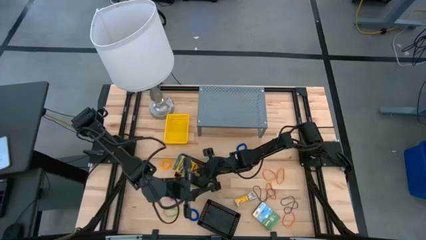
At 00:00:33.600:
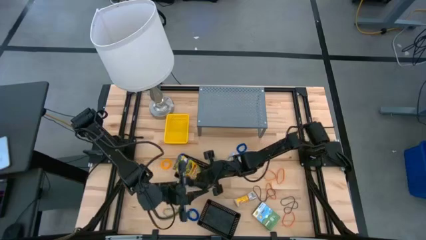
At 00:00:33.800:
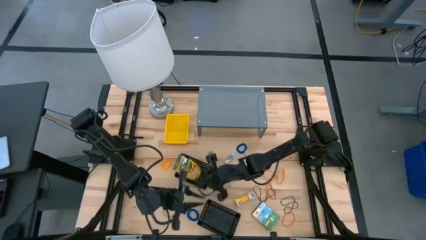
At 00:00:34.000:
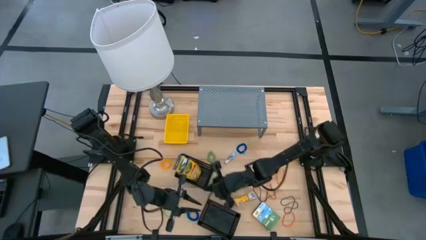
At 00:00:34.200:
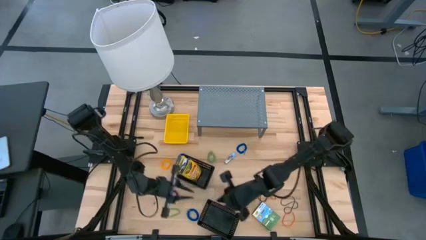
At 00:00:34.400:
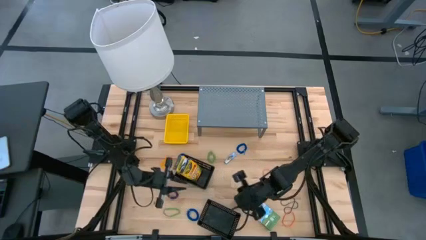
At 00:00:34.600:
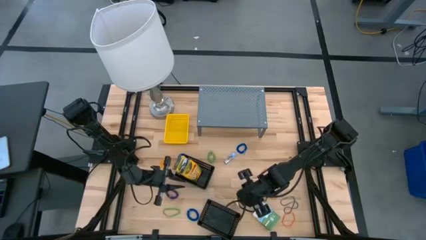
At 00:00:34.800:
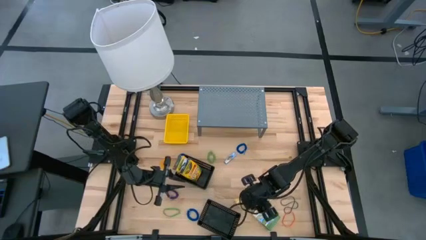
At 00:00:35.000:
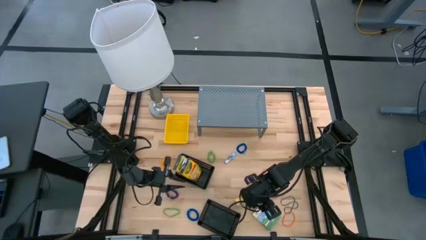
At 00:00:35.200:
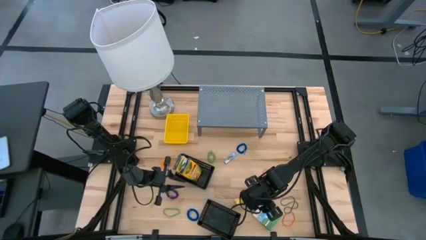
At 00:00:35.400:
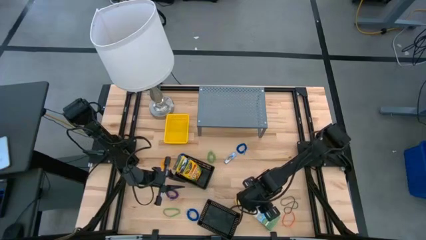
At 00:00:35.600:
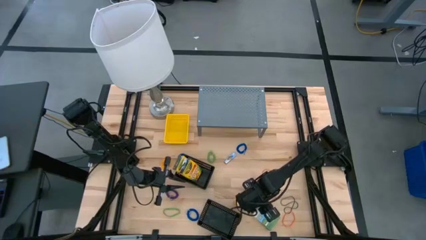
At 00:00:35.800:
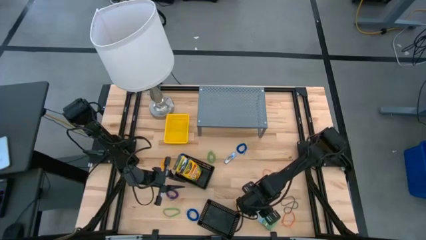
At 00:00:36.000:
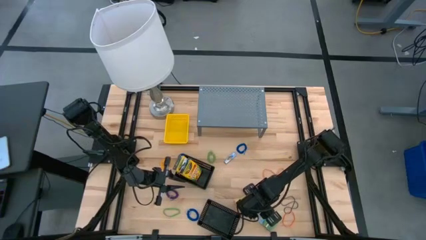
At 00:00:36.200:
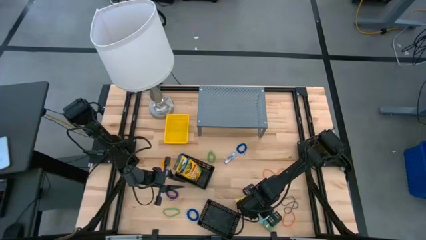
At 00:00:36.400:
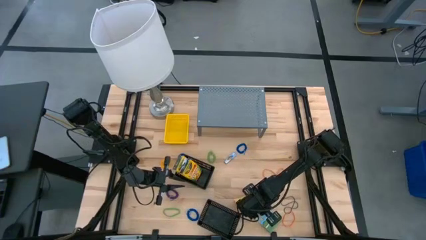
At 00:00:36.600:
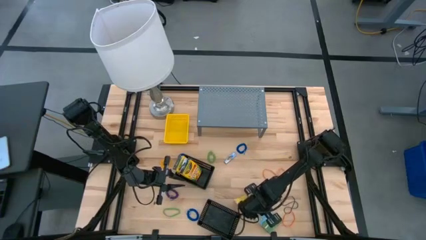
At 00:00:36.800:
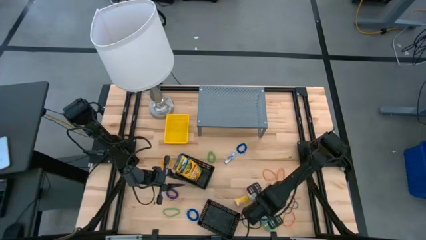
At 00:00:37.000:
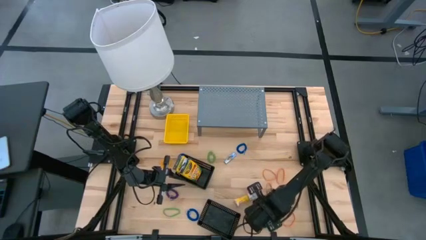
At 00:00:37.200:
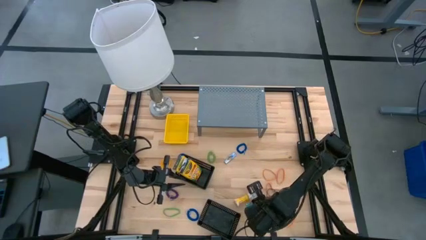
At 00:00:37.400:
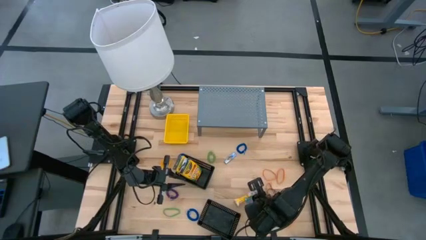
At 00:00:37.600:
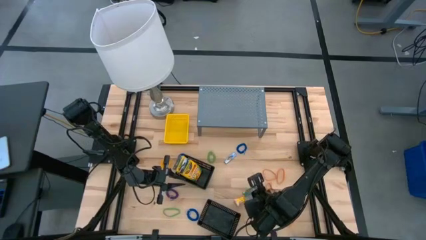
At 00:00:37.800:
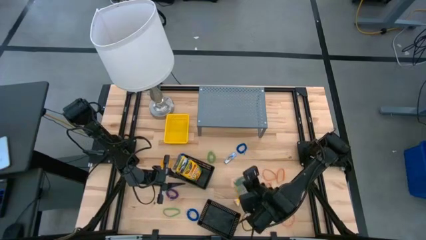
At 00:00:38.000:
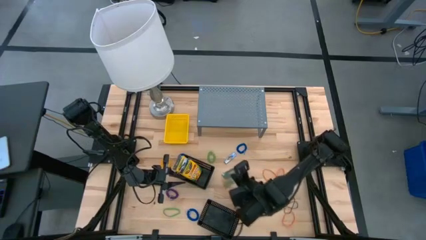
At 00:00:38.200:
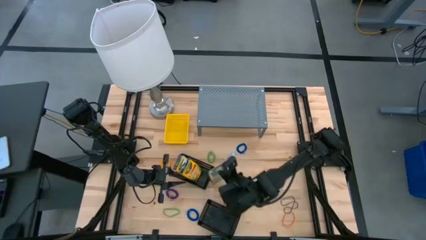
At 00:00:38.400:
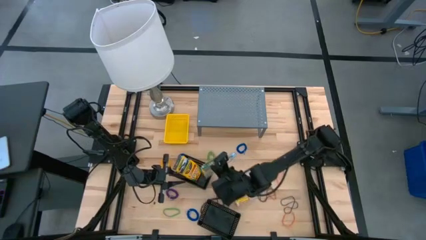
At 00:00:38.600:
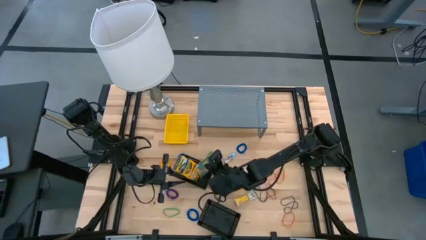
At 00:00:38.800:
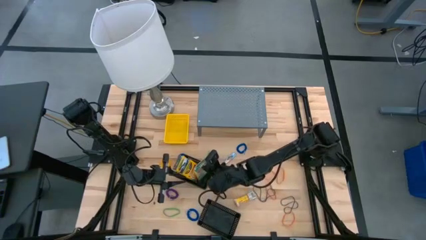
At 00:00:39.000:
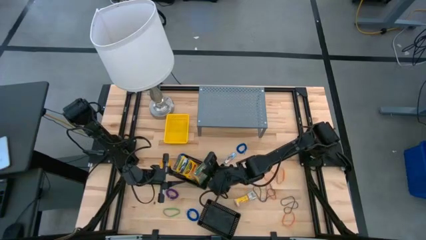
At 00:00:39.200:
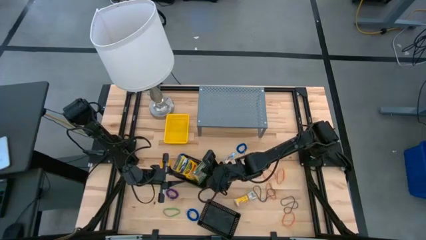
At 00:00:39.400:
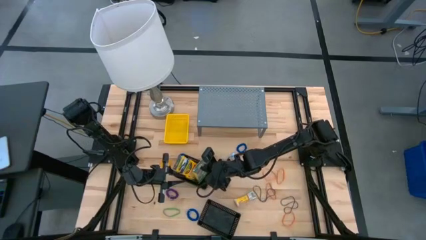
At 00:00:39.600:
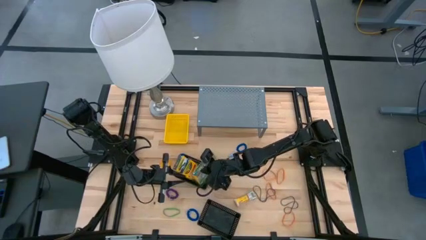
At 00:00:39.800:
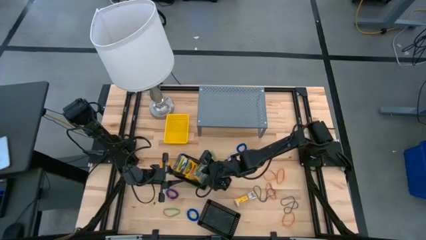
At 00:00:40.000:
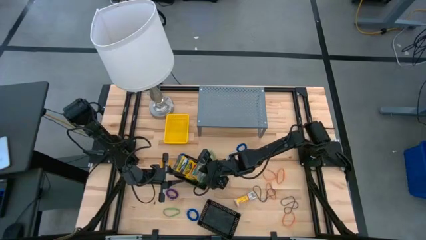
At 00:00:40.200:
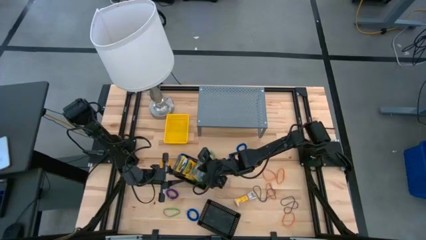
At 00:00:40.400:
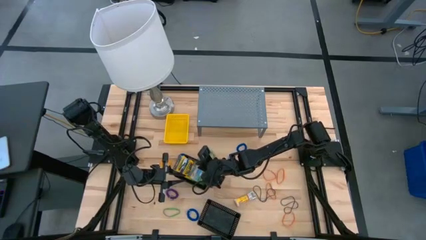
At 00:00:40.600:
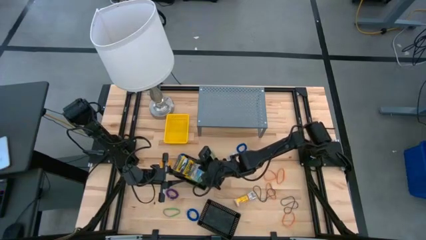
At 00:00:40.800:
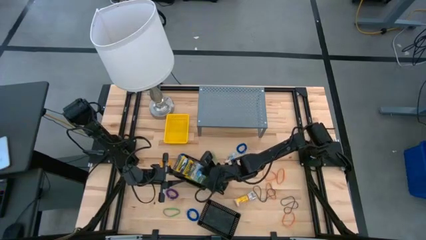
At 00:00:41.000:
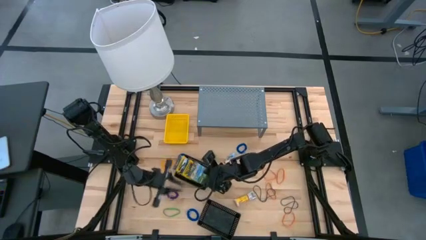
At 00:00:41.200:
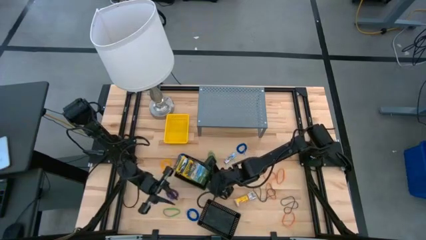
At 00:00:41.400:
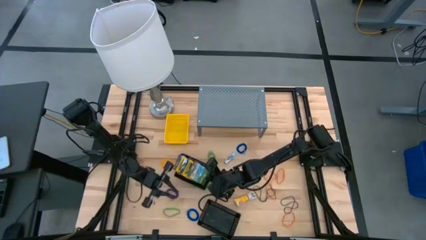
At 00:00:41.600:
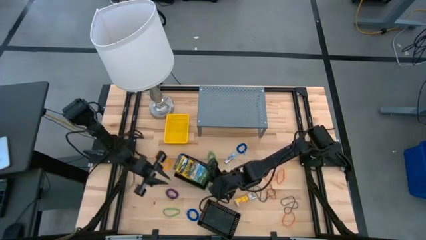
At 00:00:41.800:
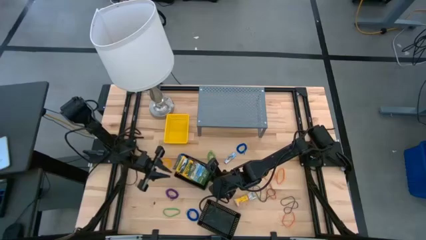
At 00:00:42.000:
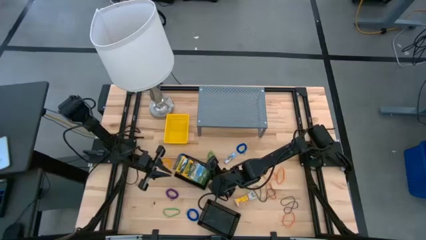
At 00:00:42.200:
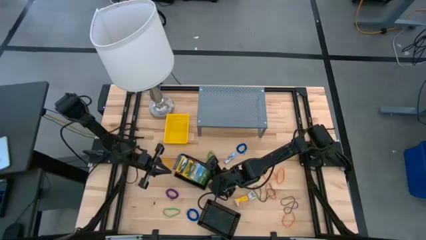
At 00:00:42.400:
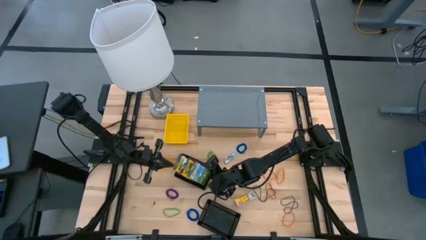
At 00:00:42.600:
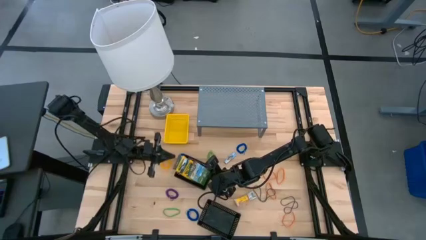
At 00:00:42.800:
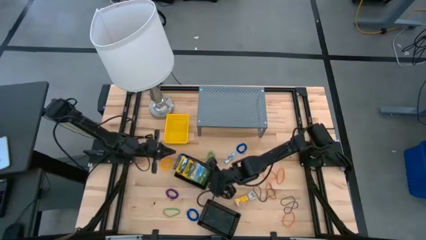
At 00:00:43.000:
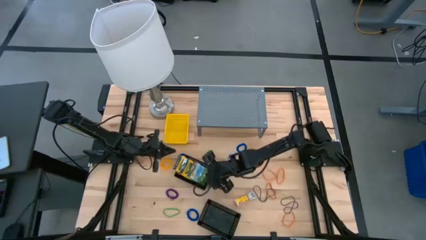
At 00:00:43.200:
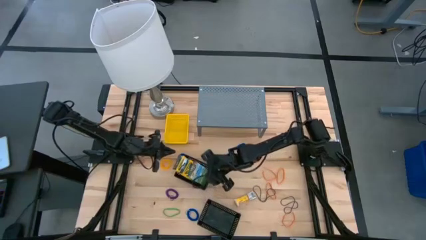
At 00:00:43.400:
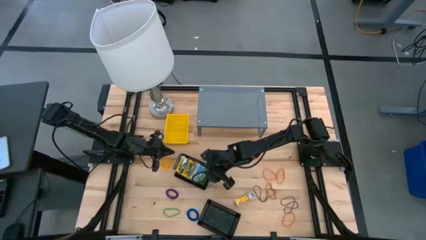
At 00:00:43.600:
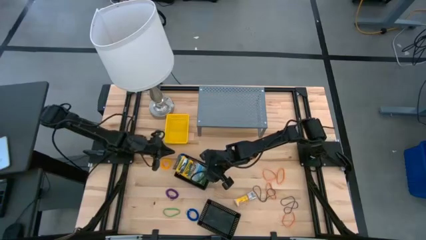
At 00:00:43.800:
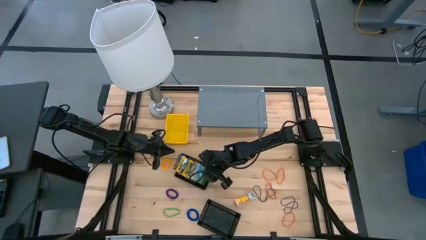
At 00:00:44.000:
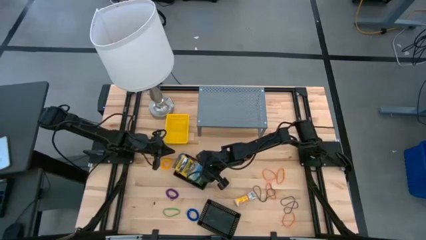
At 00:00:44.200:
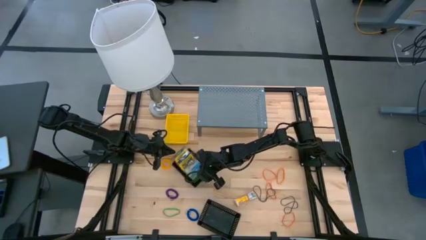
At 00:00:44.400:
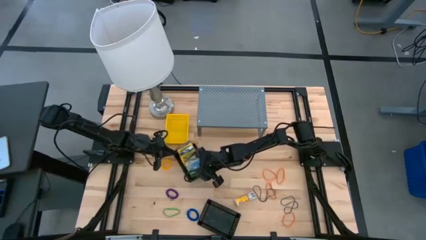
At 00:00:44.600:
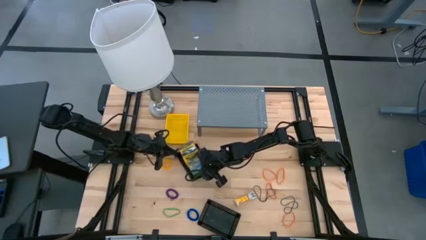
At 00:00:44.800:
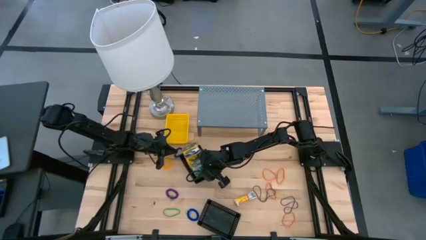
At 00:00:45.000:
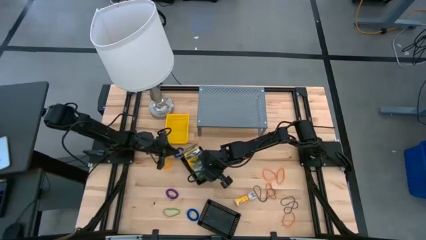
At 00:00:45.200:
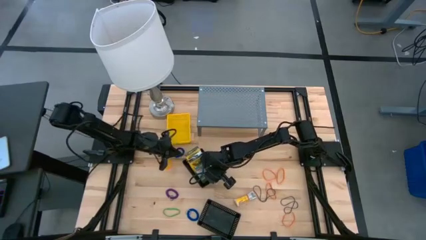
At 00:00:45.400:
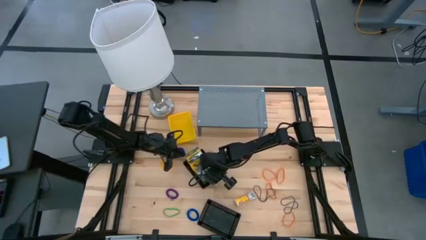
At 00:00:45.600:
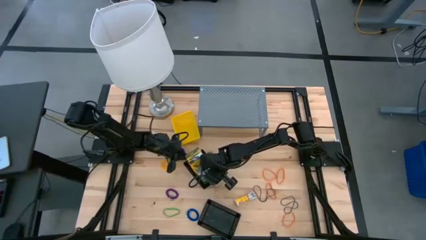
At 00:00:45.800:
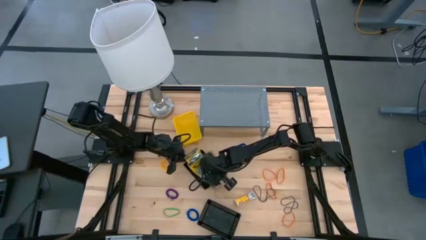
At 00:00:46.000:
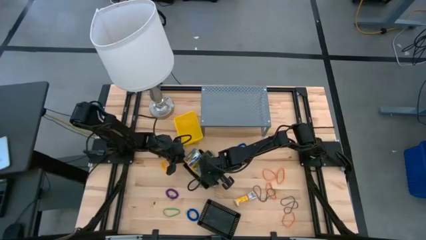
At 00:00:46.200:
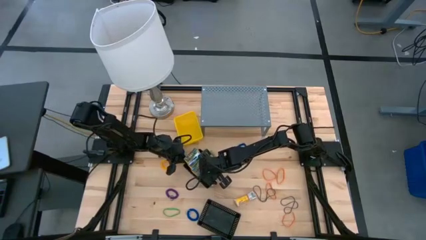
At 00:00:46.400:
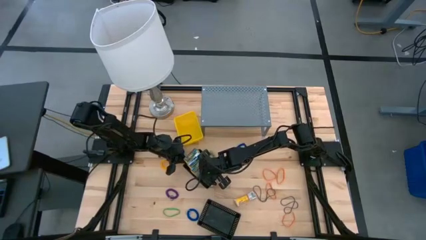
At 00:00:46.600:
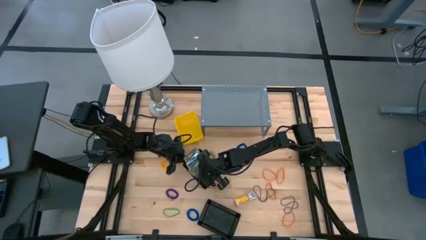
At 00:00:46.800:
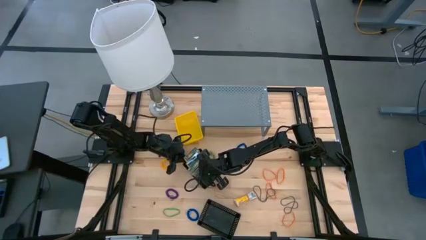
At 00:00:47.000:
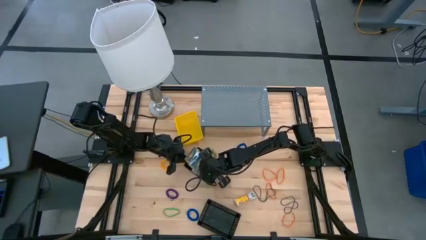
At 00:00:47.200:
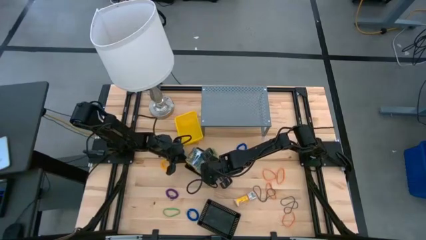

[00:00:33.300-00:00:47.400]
Task: Pick & Place Office Desk Supplies
Put the large blue crayon box into the top black bin
